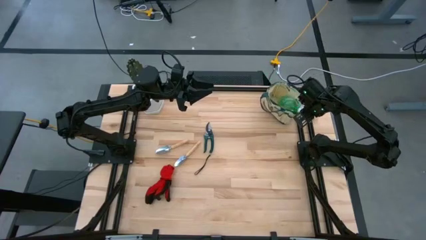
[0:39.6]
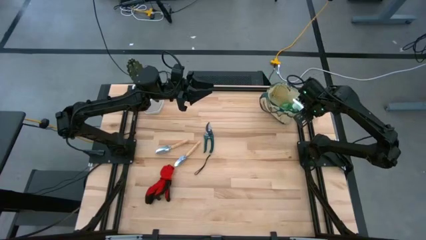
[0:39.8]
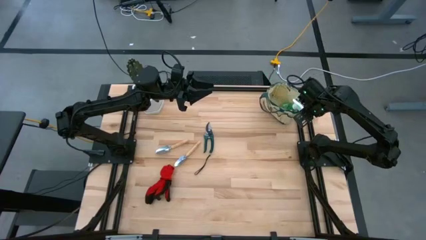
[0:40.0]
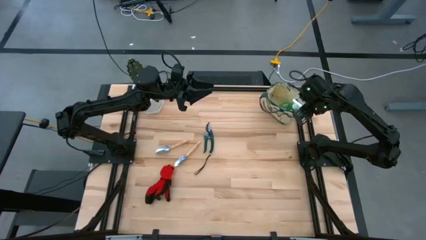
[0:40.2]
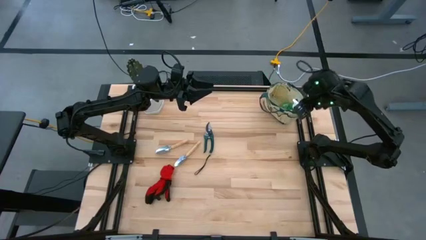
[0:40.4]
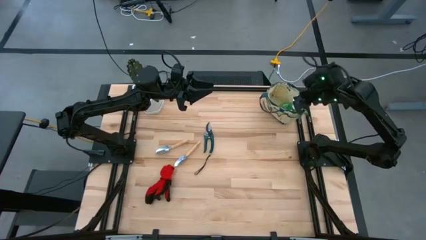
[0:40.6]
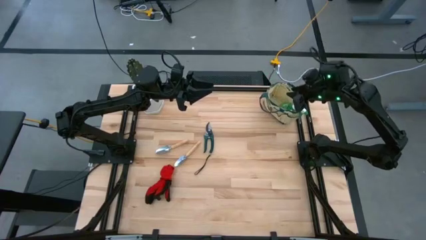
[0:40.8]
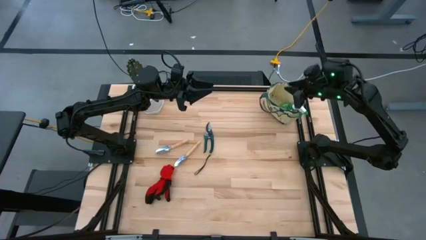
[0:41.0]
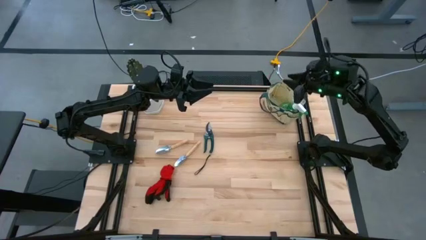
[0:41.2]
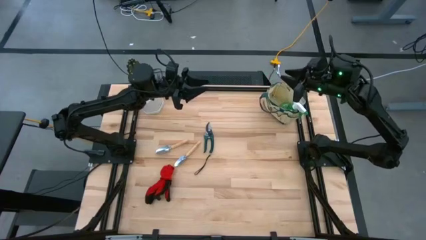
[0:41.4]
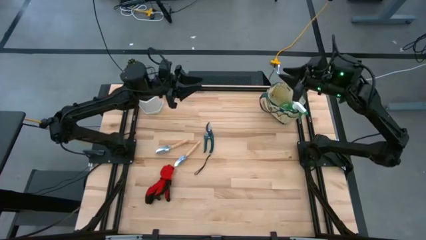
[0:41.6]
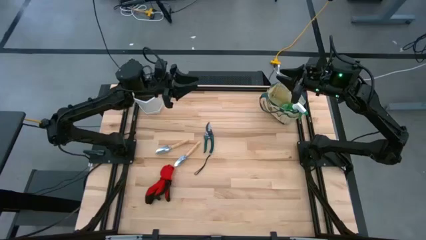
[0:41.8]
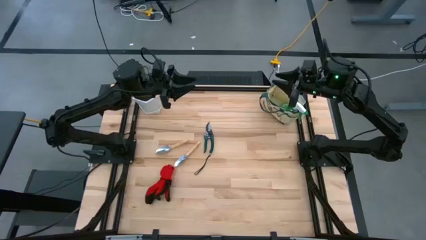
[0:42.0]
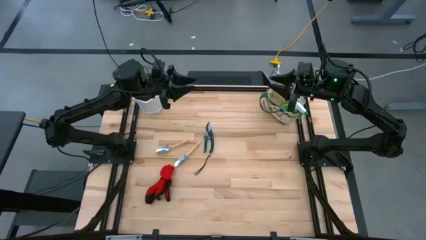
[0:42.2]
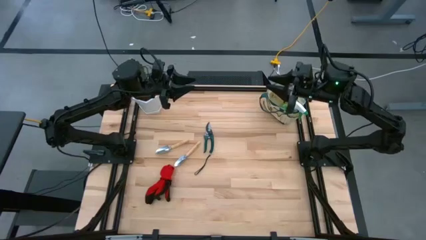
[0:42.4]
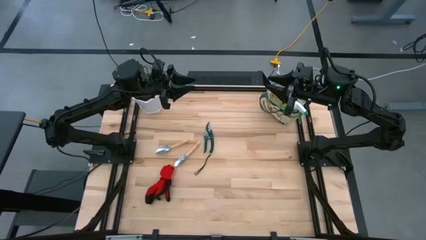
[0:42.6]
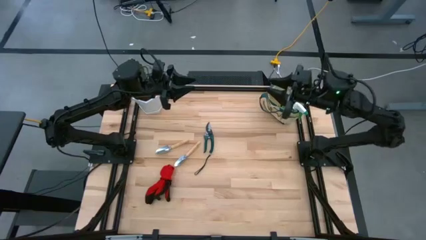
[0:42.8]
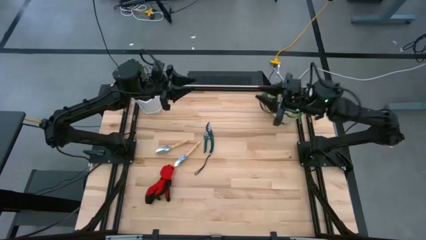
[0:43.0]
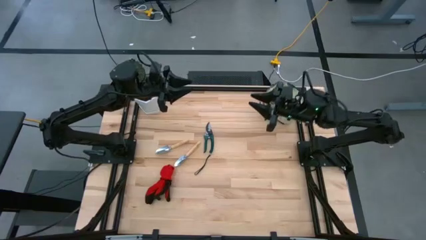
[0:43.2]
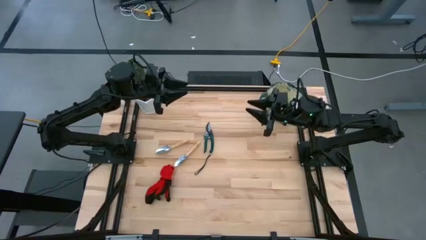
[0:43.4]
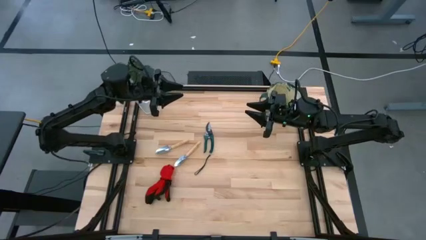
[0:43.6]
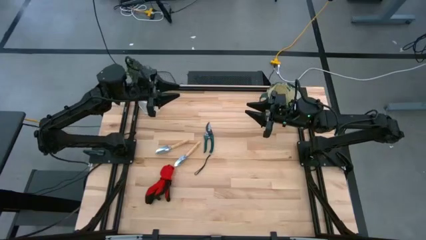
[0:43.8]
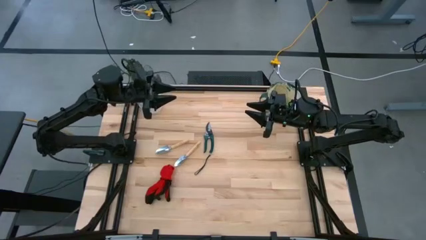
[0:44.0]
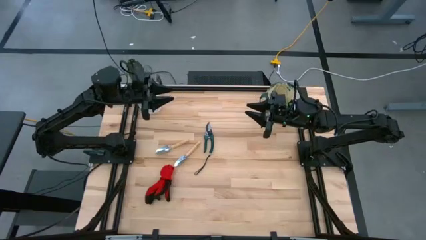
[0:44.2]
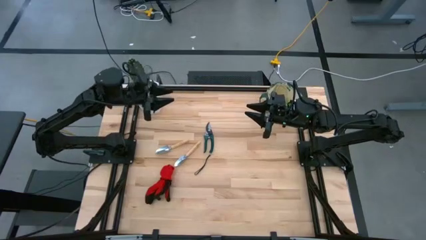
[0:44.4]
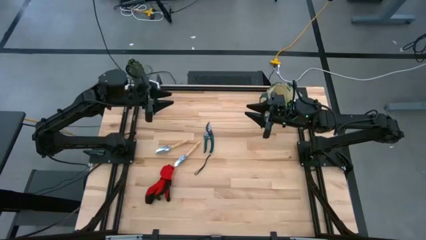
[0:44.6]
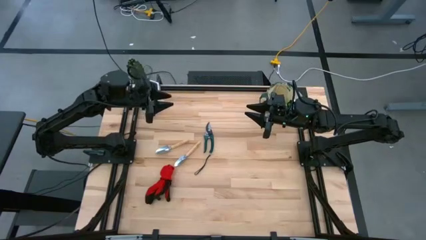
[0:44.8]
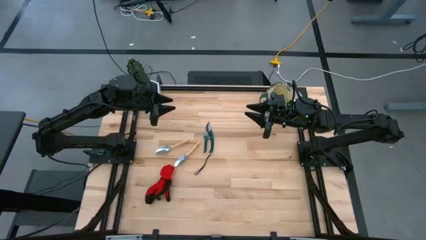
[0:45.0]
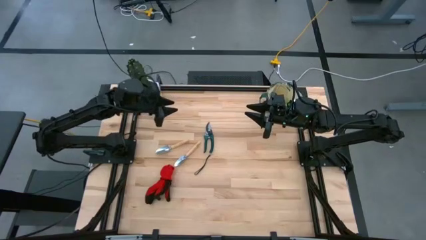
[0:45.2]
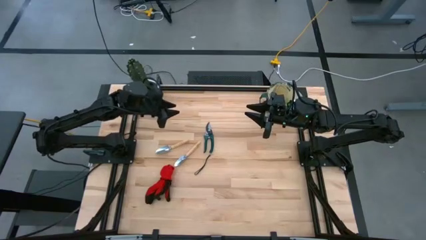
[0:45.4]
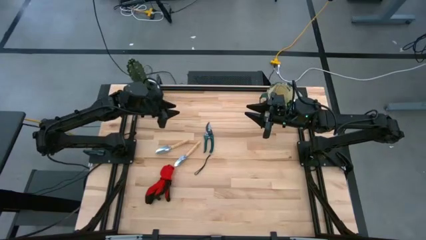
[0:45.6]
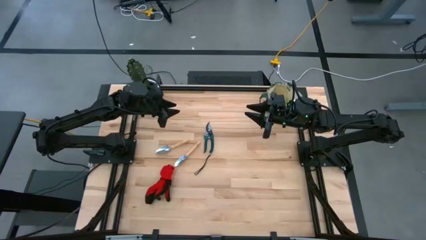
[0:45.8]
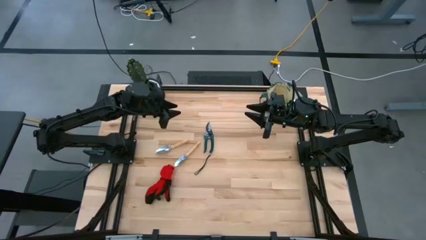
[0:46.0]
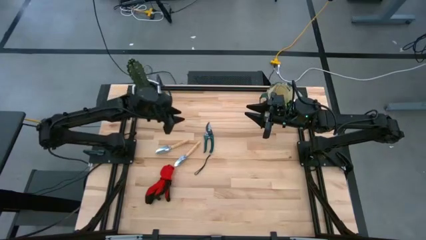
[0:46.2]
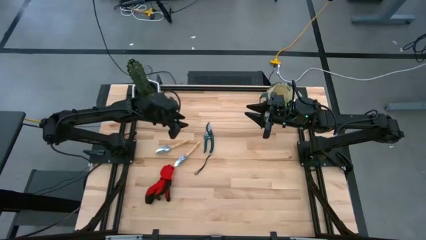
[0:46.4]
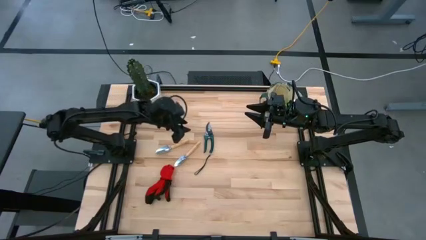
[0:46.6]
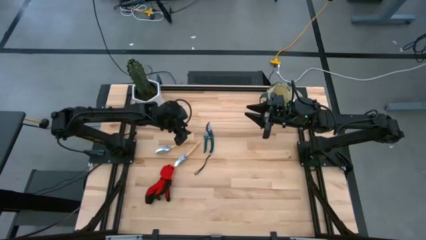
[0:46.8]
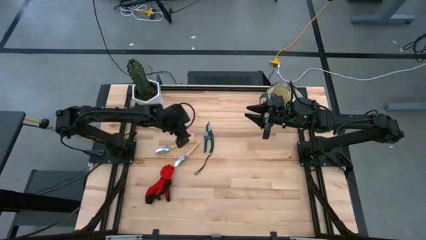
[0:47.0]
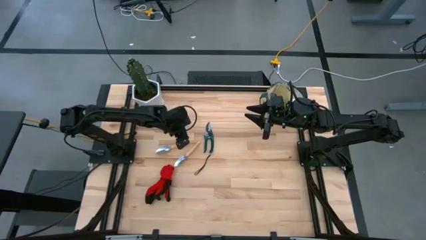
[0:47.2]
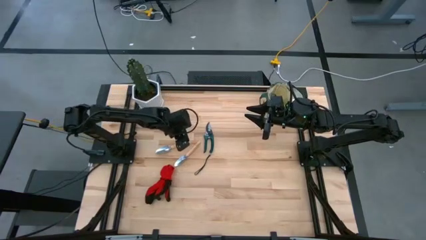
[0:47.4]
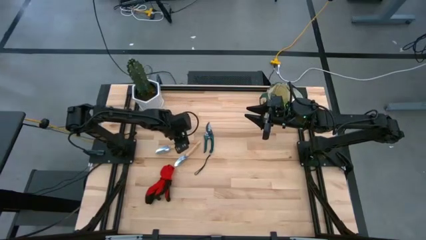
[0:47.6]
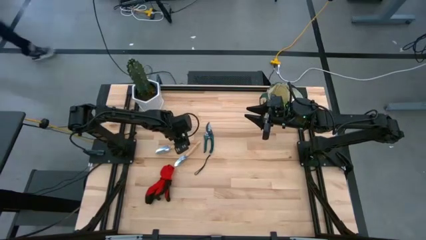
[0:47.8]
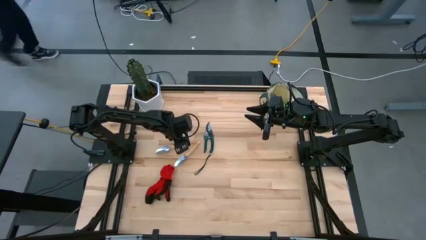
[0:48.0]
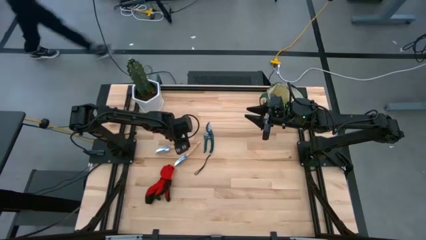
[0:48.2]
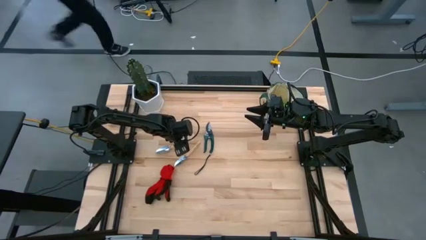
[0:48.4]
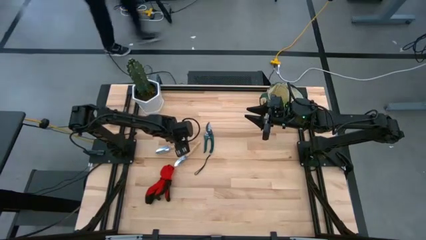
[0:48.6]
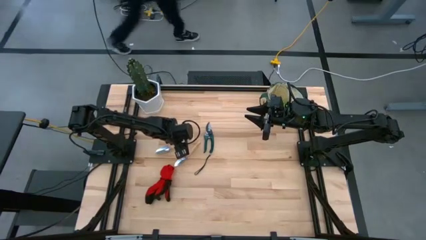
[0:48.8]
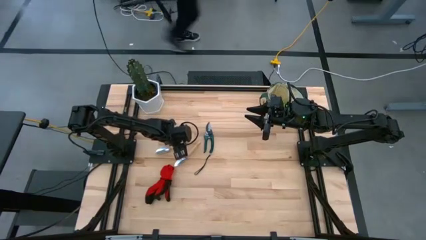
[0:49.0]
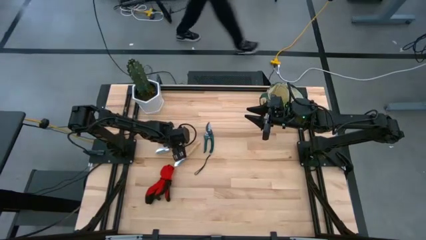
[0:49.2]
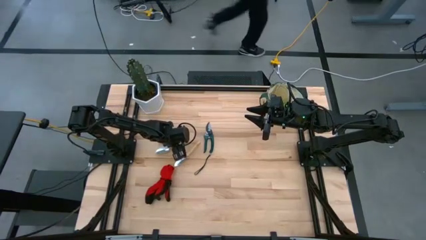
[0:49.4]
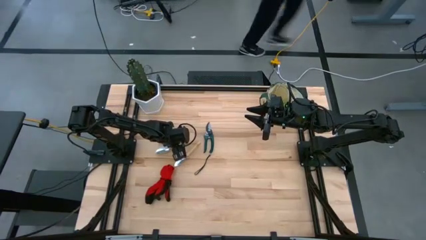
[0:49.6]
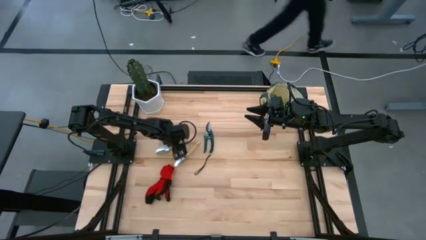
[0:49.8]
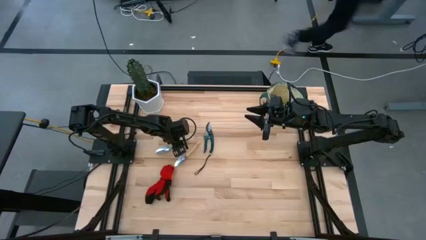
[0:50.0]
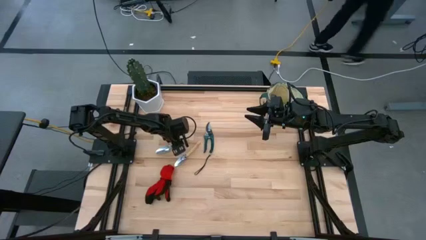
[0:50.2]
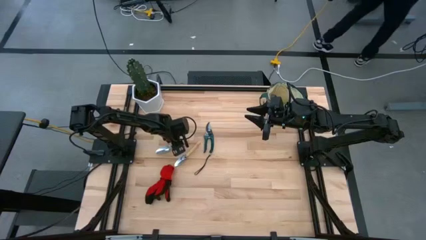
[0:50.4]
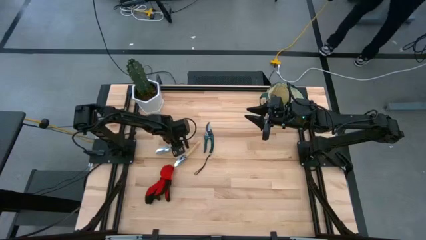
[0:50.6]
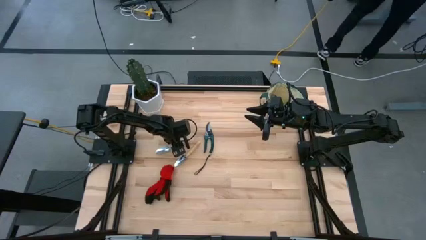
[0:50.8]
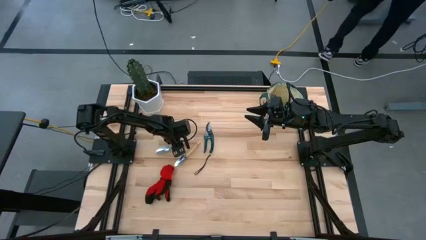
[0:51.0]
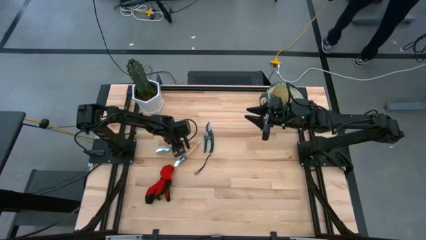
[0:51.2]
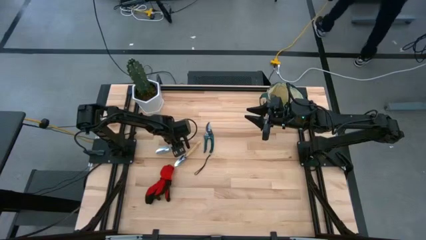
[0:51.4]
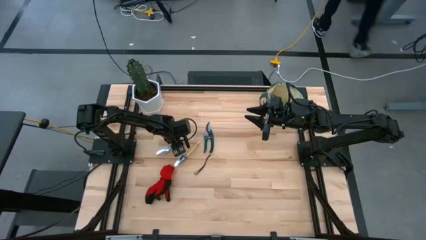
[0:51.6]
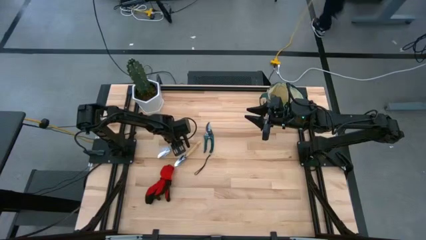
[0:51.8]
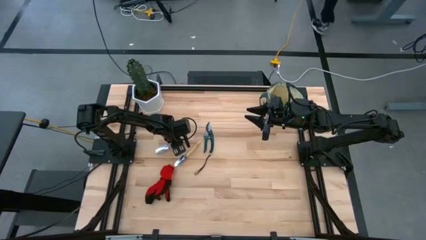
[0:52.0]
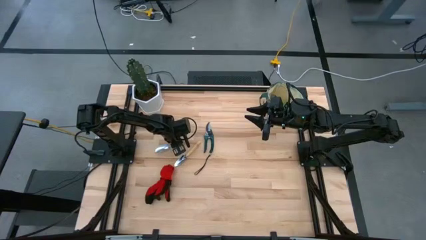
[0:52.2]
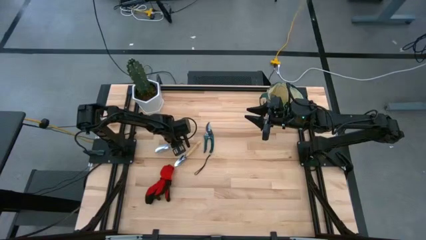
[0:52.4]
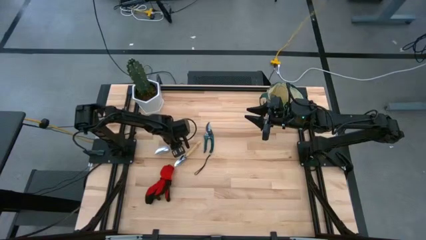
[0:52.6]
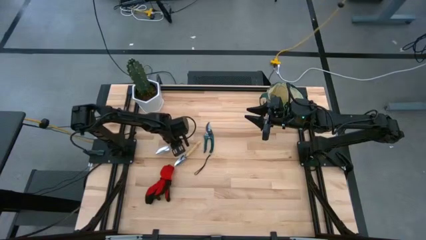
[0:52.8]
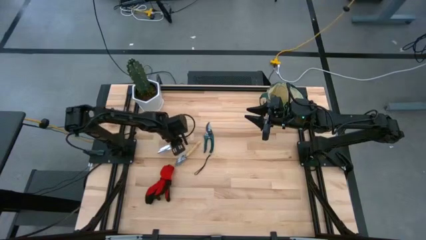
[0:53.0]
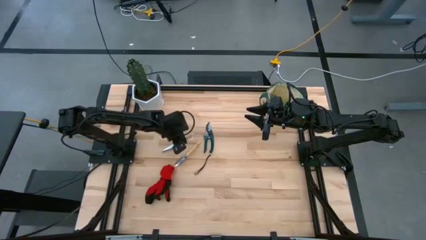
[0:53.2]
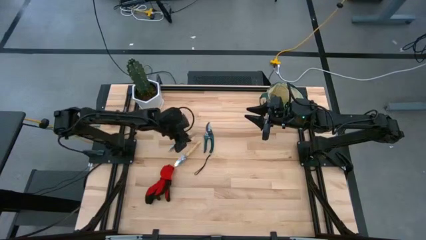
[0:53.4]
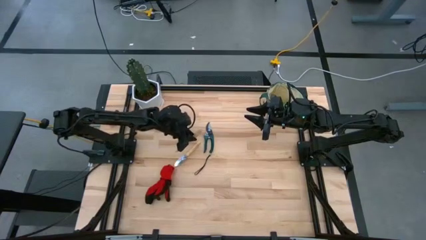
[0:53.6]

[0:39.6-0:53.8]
Task: Pick & Place Garden tools in Gardening bag
Put the left brown trowel into the white gardening bag

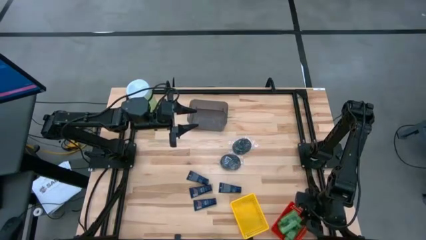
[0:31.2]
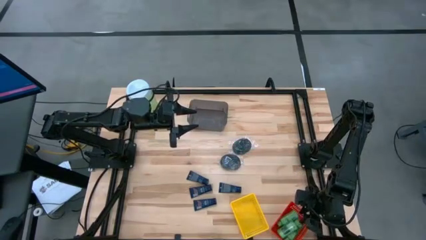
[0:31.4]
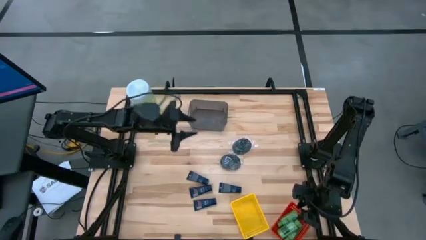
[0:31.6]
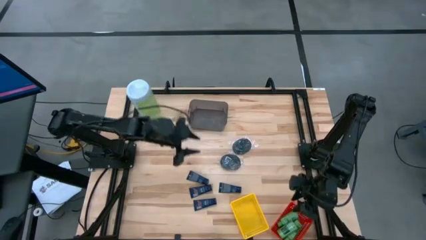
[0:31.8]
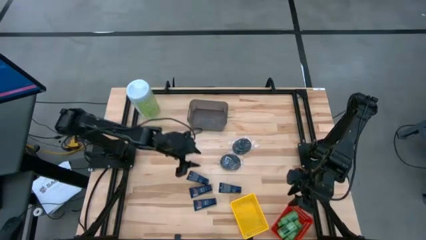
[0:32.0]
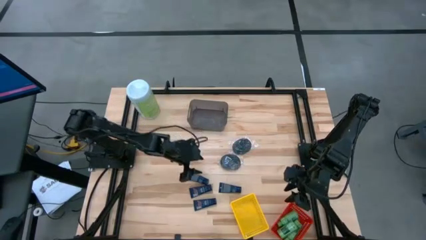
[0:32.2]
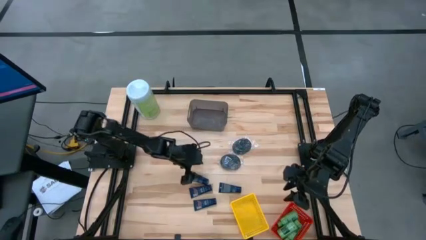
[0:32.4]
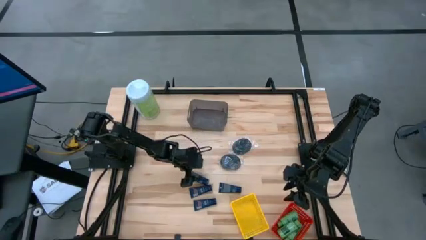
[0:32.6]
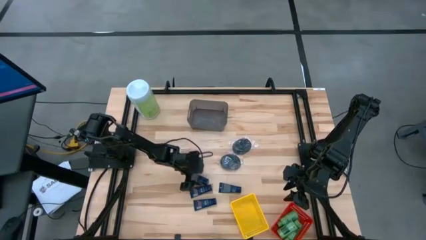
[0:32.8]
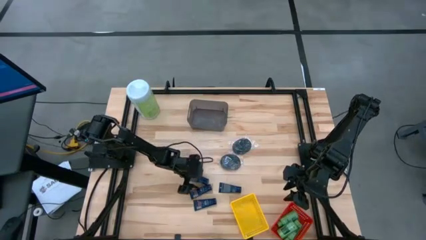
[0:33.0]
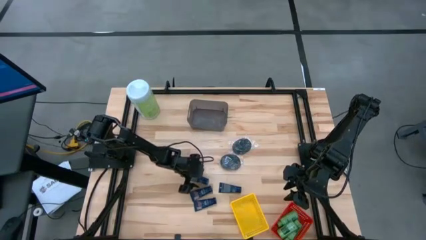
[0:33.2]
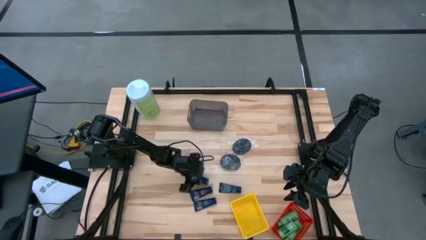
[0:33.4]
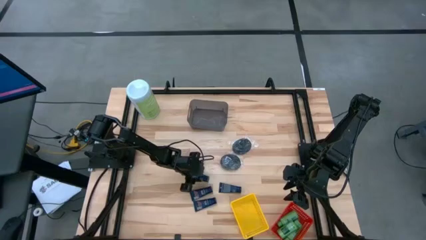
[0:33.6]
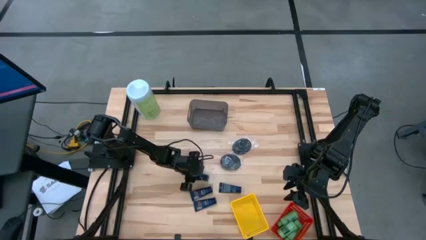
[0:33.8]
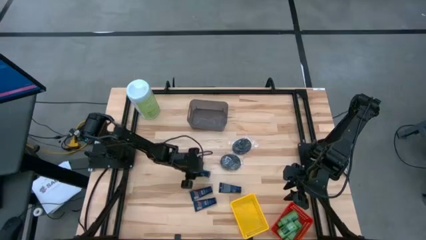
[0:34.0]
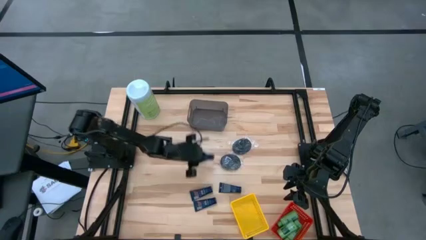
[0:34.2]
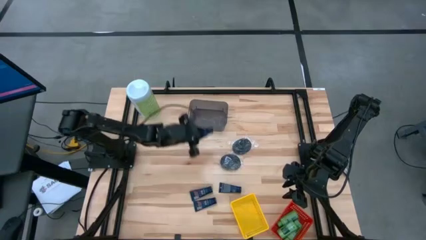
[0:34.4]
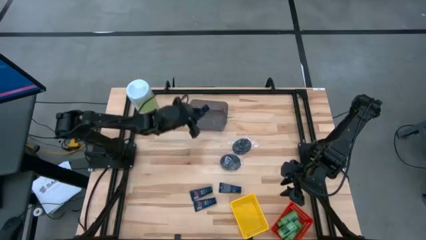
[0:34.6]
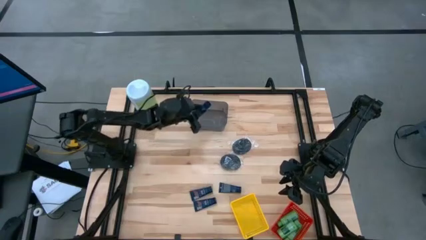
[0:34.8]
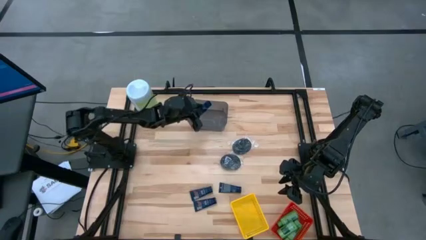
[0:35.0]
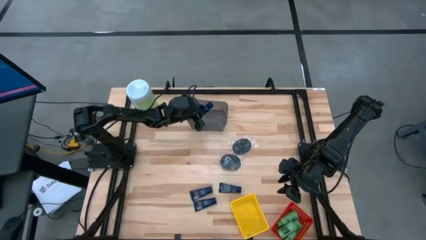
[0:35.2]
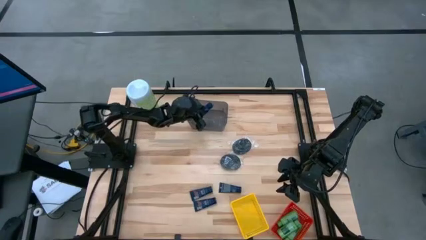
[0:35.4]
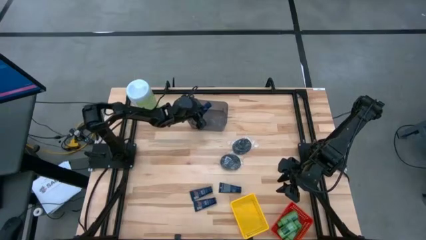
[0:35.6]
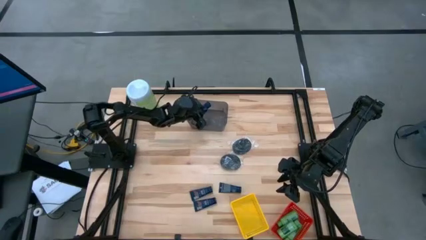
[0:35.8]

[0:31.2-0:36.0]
Task: Pick & Place Travel size toiletries
Put the black shave cream on the black bin
